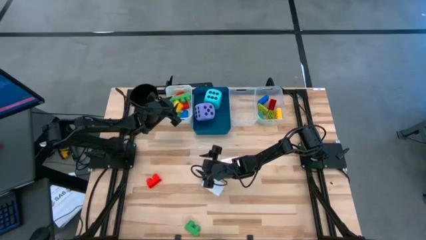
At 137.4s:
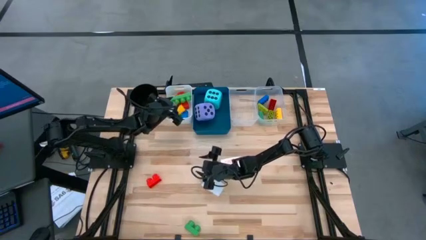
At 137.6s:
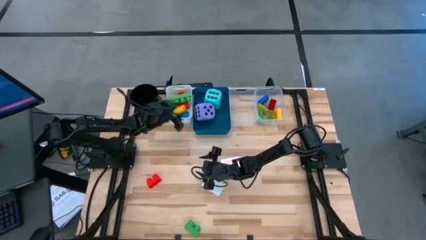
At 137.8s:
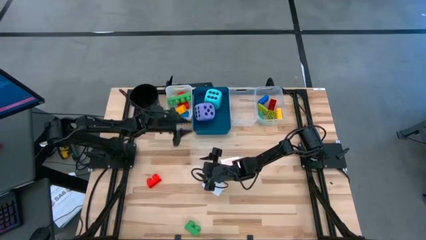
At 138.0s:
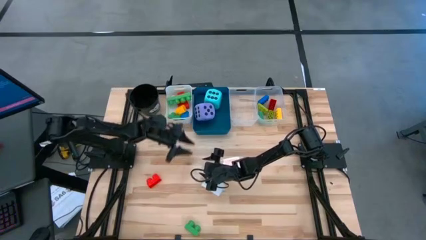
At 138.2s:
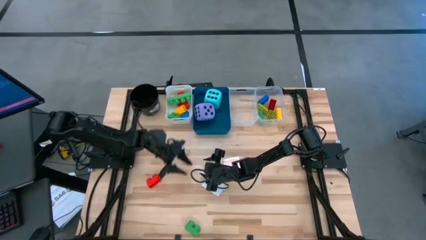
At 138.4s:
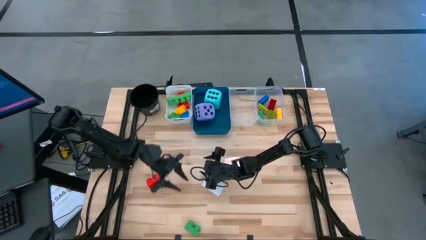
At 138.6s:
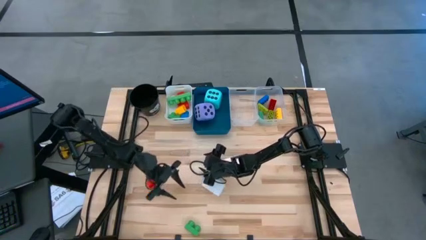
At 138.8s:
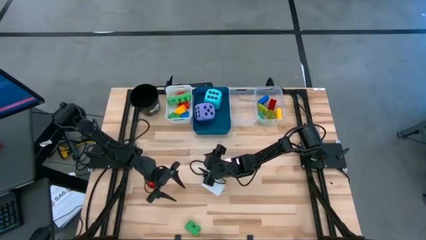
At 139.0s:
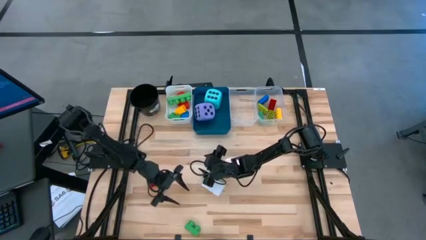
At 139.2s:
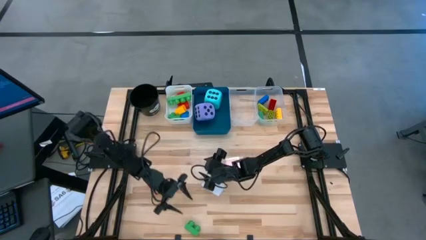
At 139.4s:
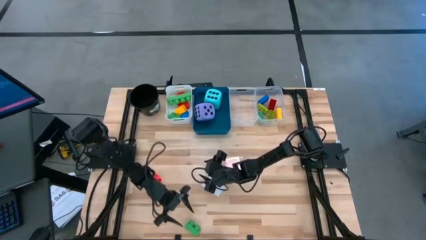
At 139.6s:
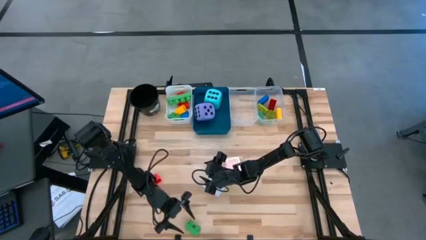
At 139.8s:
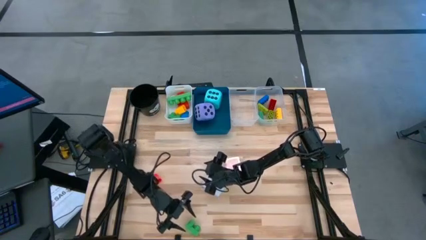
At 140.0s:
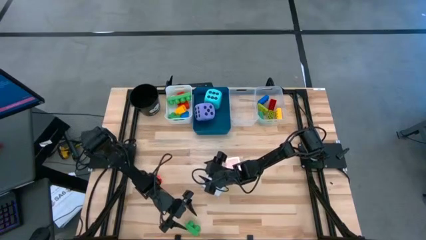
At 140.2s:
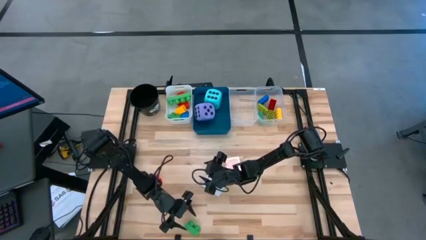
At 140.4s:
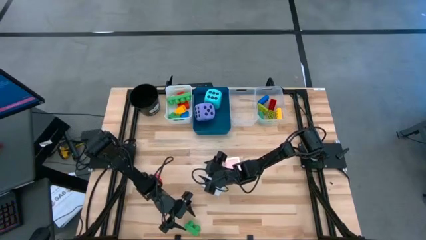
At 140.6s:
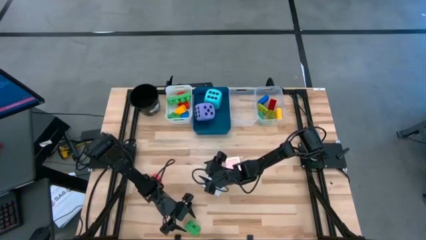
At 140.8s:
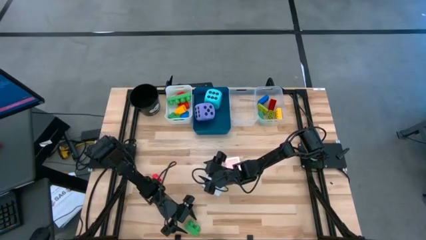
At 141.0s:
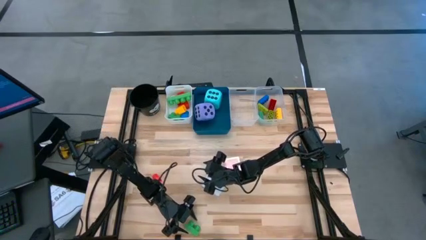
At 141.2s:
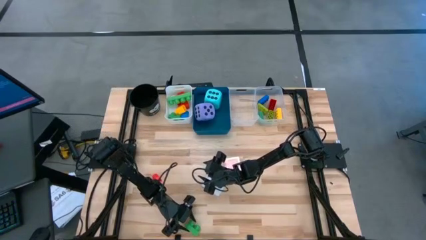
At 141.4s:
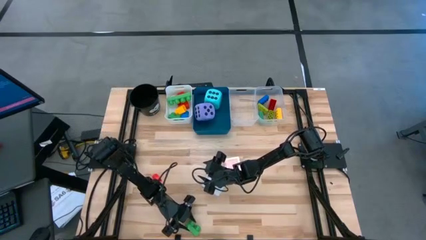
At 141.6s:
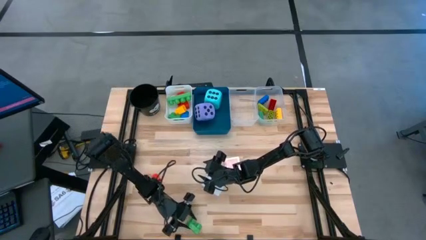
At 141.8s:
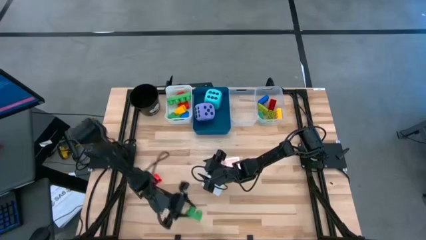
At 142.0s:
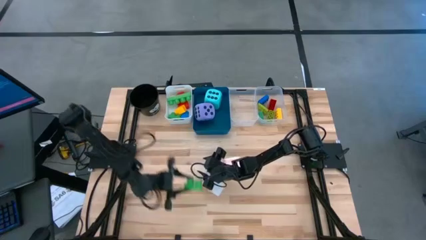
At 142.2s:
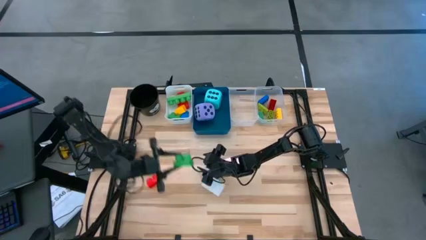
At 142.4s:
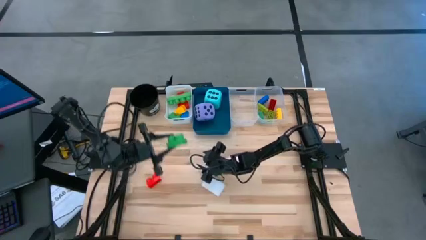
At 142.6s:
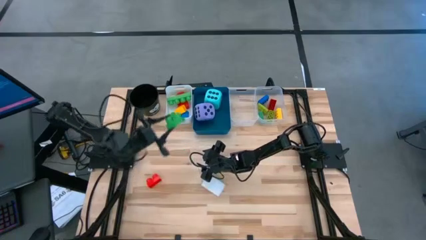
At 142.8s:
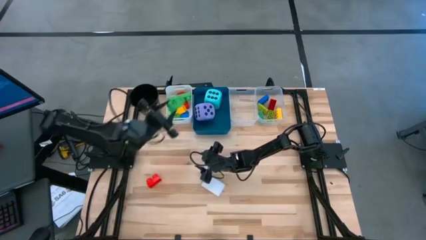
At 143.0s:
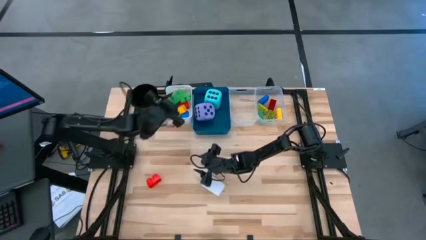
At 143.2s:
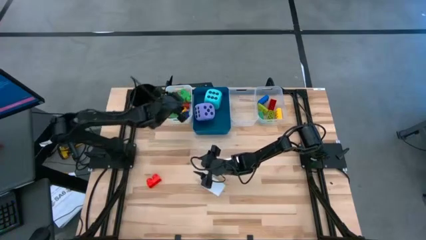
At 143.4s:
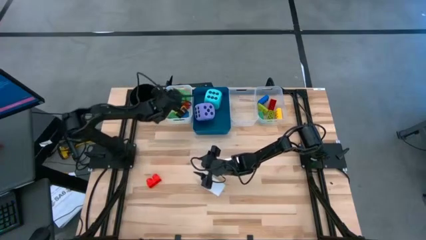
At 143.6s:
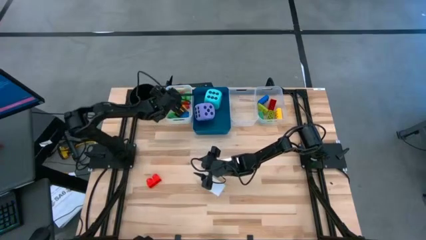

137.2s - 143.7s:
Task: Pick & Place Toys
Put the large green game piece into the white bin

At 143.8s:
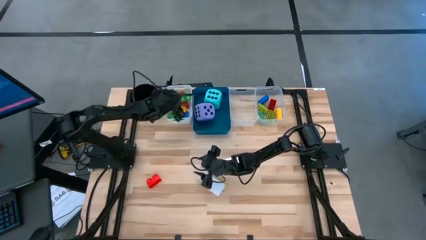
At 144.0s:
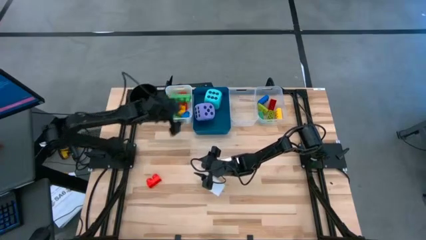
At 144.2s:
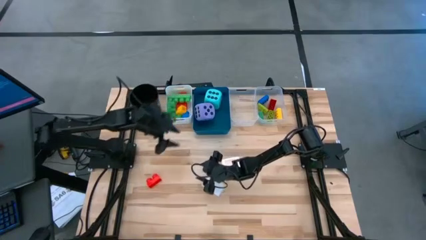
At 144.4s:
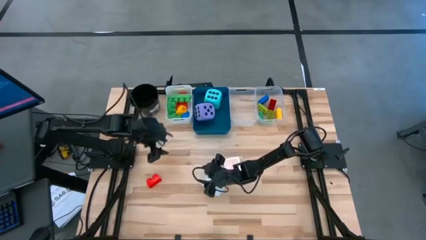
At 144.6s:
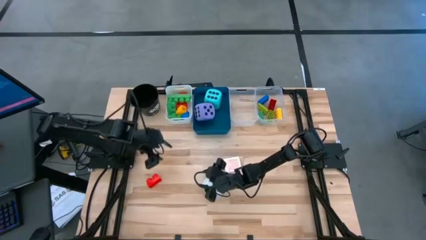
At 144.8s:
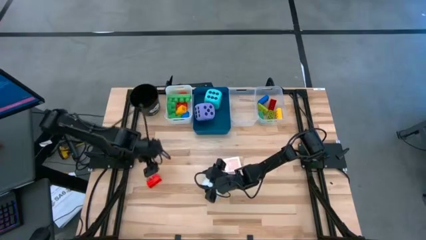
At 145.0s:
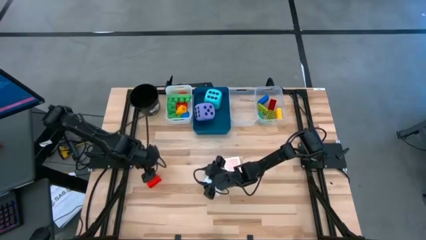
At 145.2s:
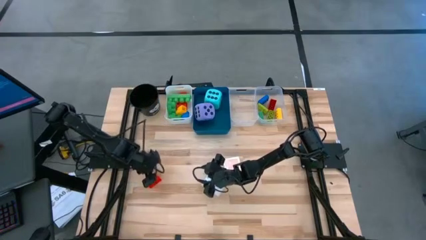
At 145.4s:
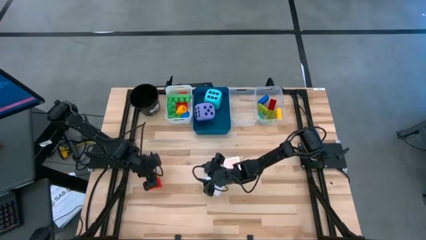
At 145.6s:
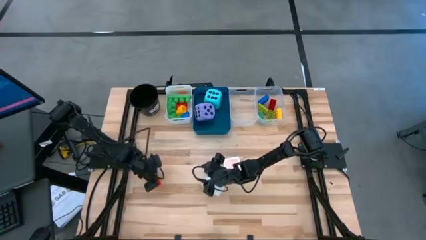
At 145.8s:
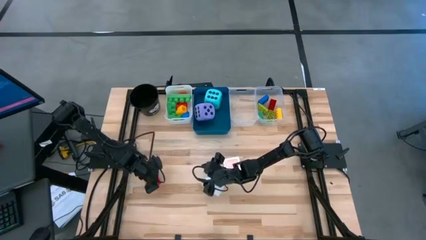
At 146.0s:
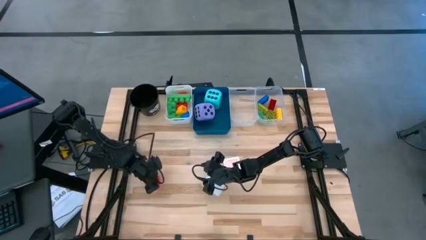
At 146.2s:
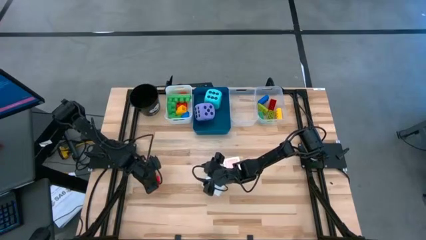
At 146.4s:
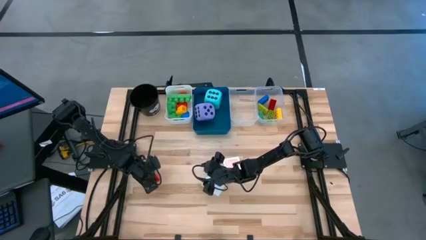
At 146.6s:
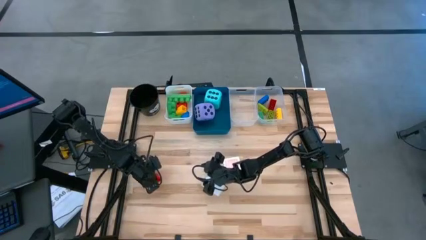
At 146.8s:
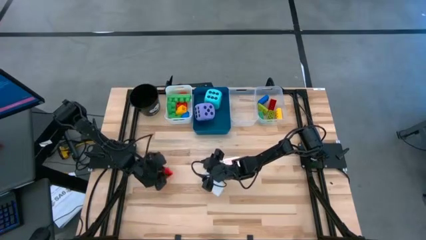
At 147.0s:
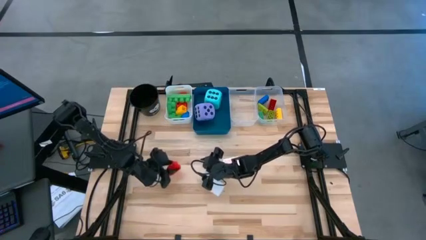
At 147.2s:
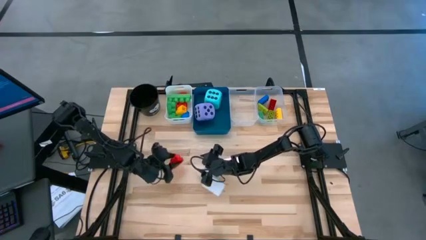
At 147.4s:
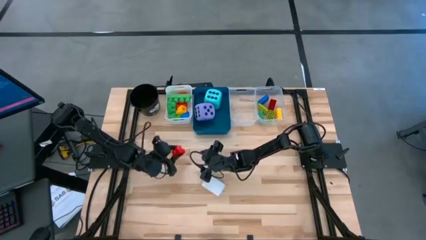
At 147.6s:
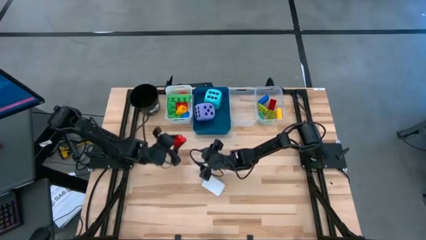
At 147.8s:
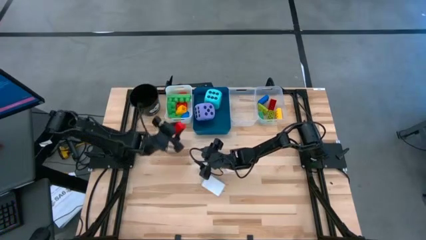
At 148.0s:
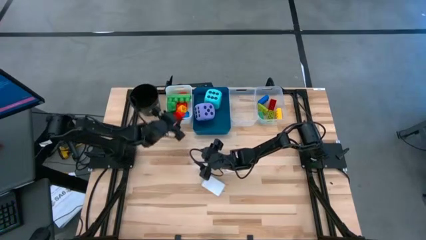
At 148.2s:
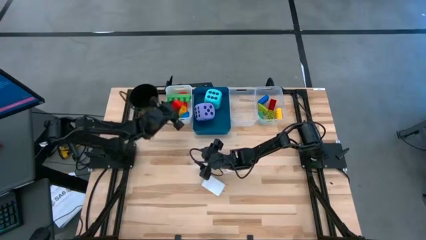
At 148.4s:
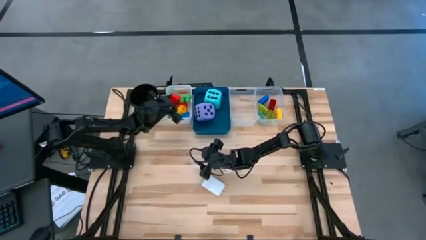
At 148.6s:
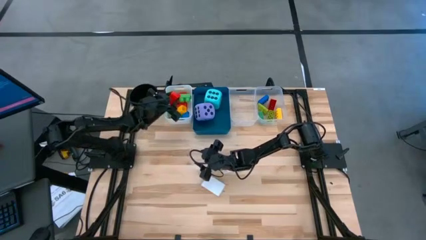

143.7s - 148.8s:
Put the large orange game piece into the white bin

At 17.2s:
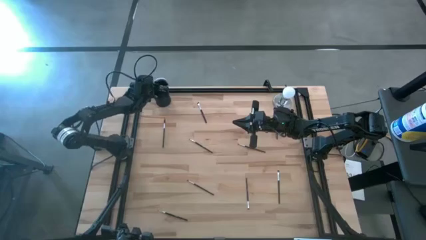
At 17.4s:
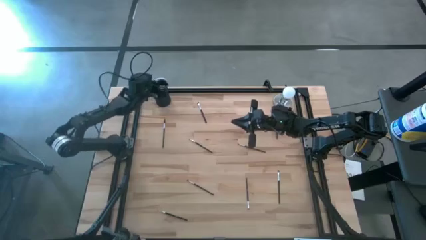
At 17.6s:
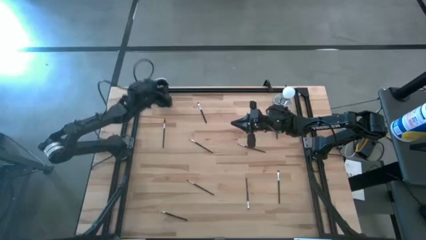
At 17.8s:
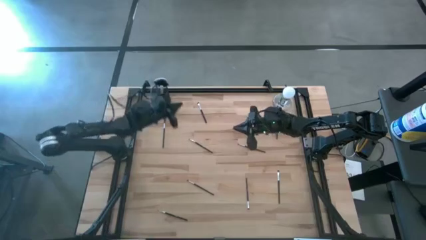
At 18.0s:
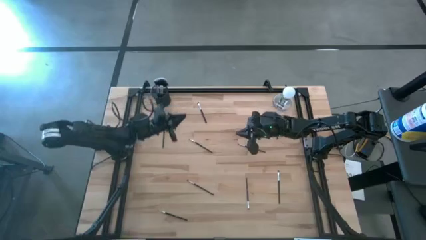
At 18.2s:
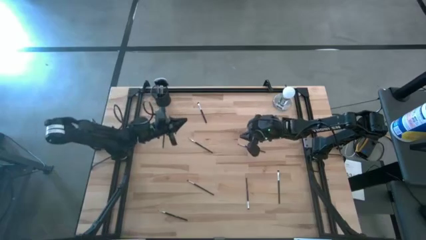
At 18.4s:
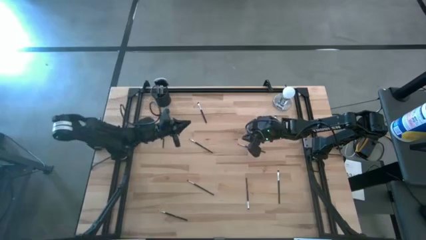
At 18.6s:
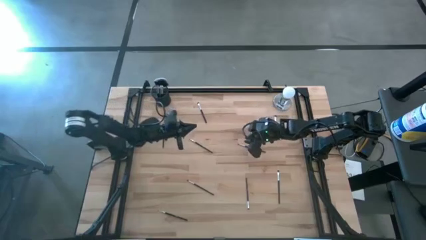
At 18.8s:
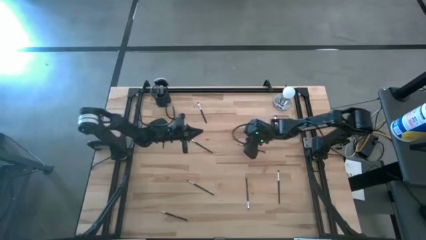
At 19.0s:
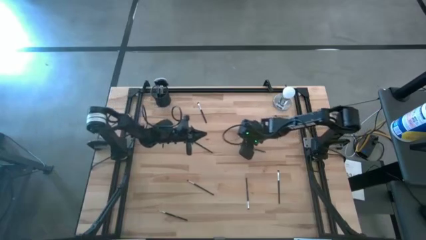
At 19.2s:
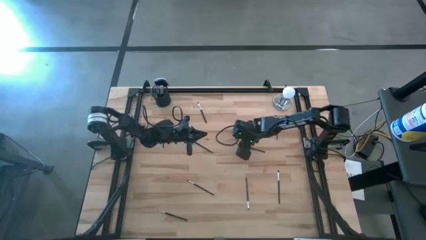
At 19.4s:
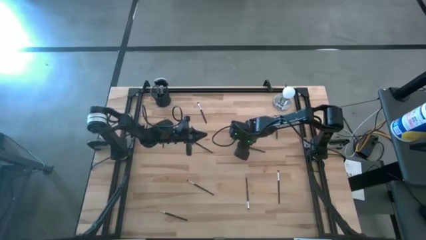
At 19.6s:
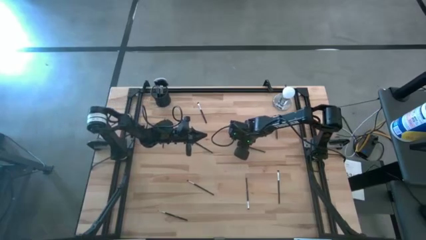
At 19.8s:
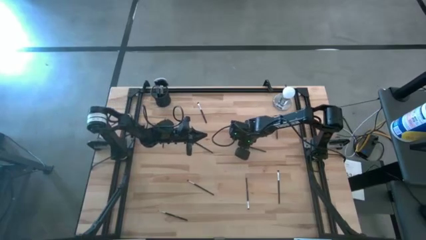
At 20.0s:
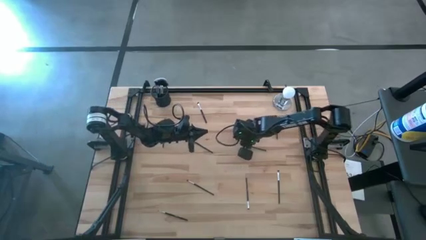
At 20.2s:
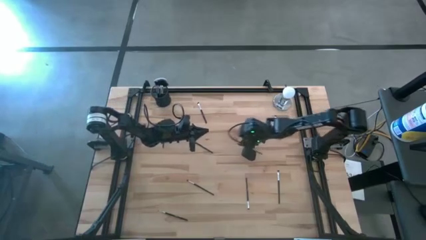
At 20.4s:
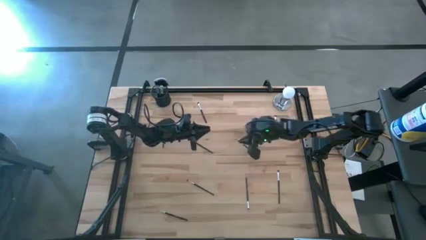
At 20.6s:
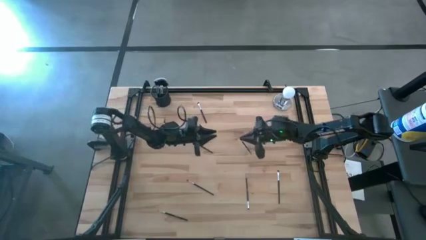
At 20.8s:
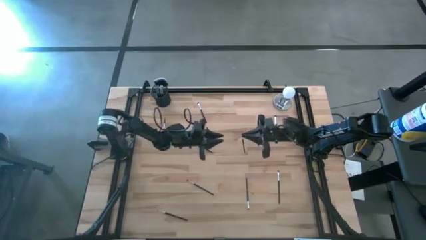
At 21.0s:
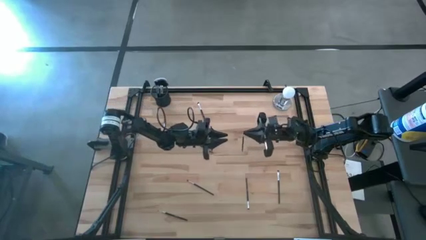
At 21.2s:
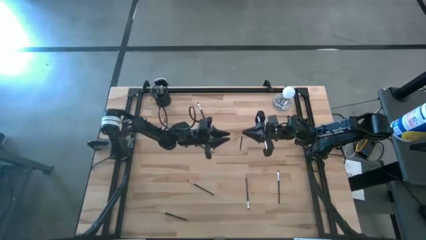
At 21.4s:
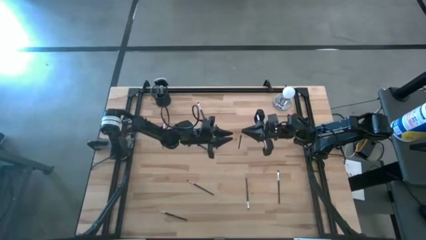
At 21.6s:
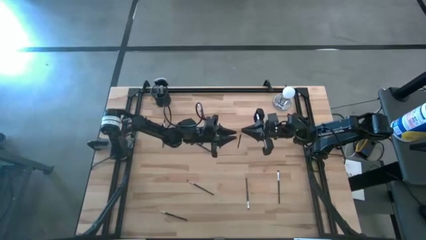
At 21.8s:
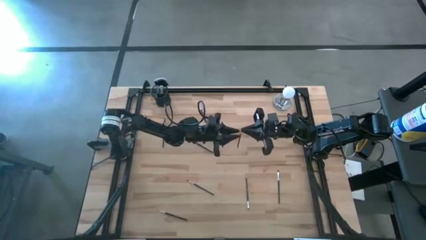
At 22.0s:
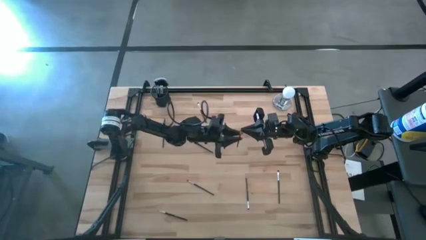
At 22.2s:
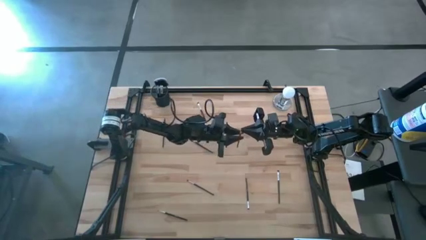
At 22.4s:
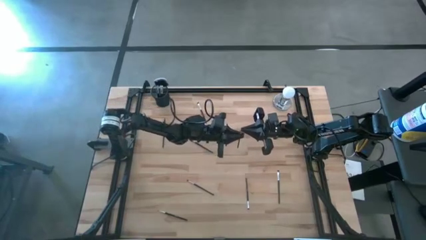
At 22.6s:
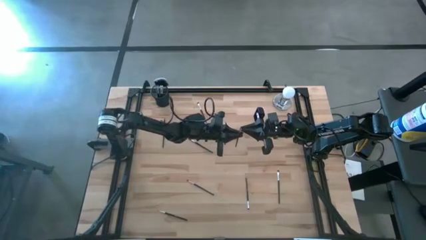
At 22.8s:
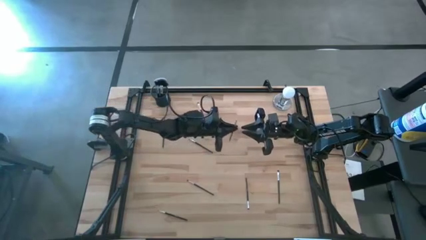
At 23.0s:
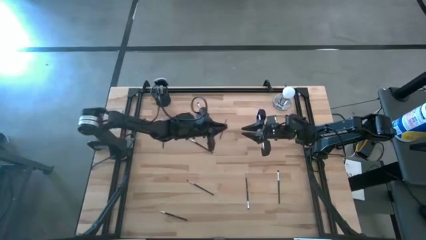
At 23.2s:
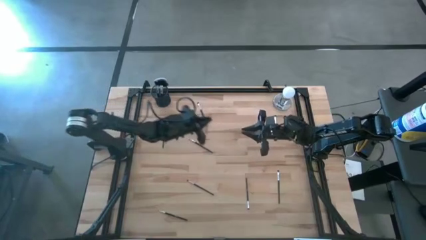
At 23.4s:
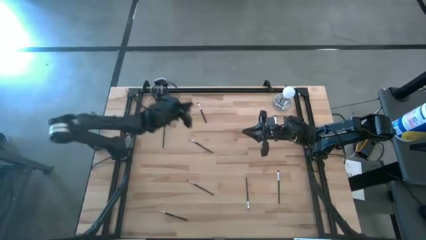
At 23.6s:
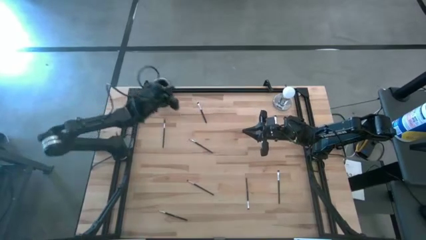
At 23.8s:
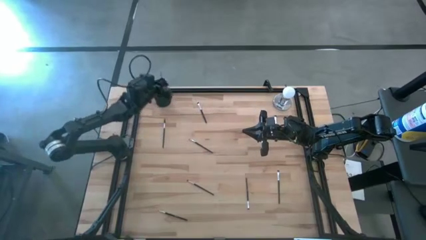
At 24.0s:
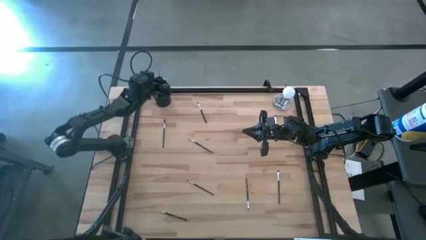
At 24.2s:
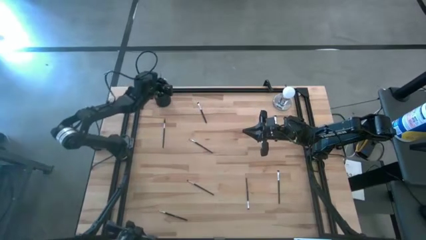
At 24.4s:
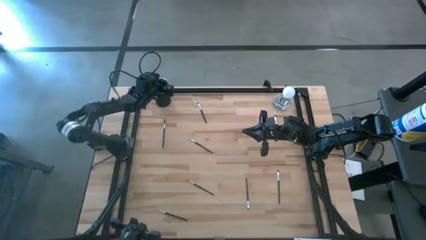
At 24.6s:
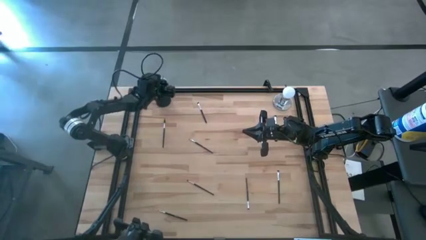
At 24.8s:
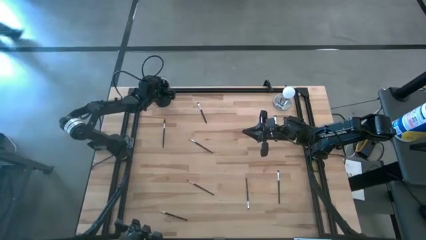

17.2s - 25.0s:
Task: Put items in baskets/containers
Put the foundation brush into the pen holder
